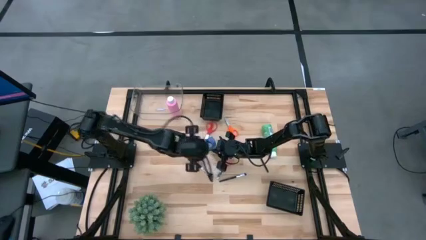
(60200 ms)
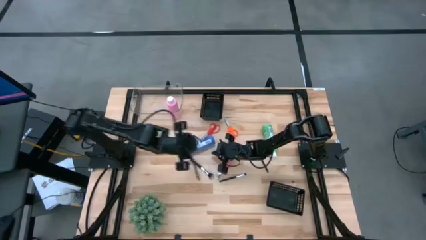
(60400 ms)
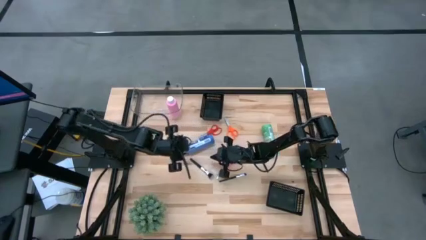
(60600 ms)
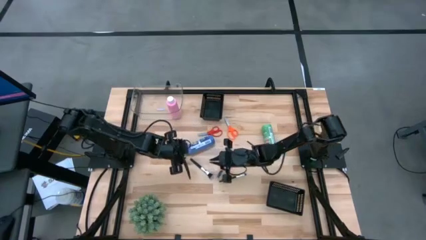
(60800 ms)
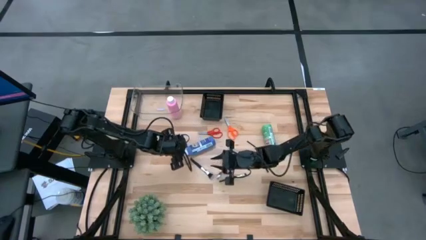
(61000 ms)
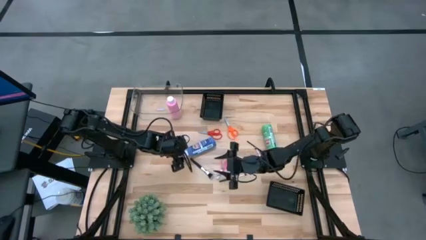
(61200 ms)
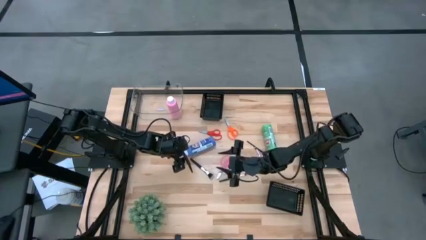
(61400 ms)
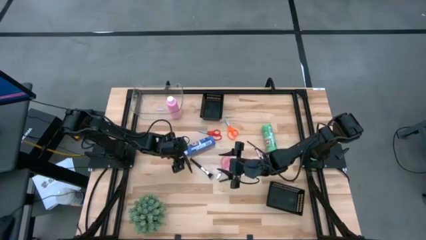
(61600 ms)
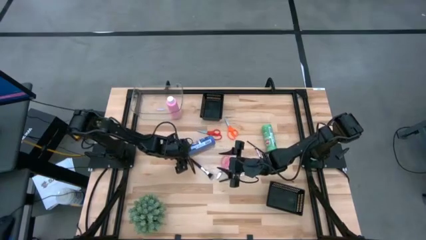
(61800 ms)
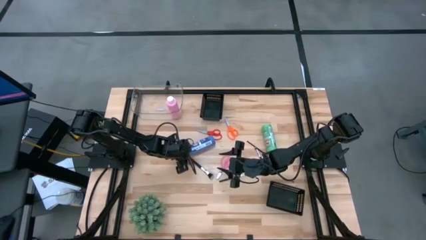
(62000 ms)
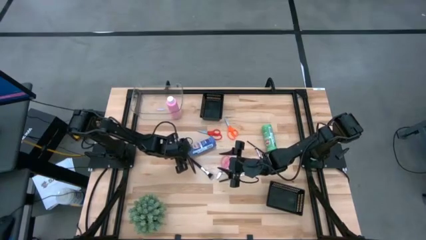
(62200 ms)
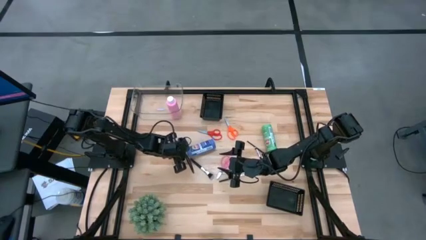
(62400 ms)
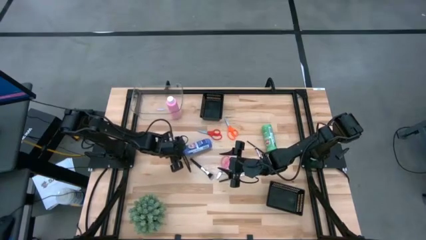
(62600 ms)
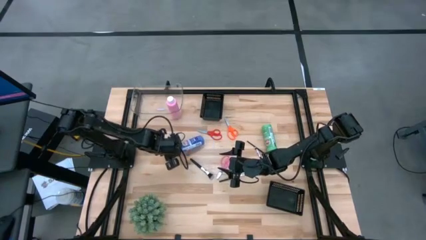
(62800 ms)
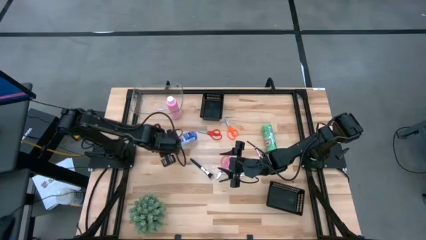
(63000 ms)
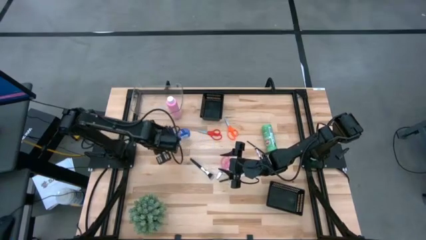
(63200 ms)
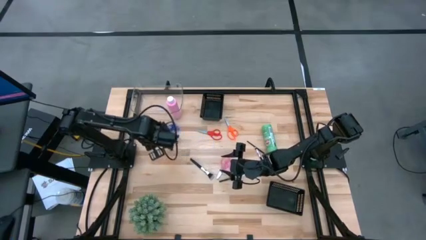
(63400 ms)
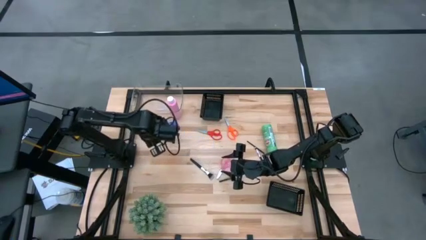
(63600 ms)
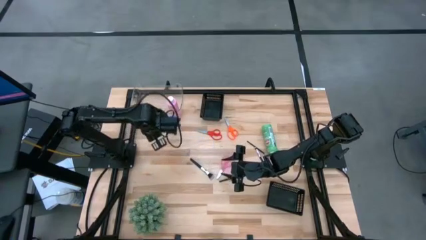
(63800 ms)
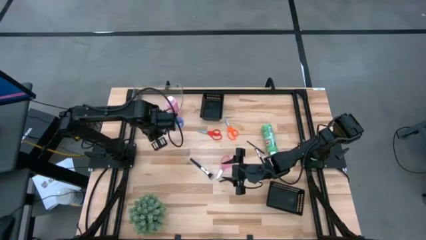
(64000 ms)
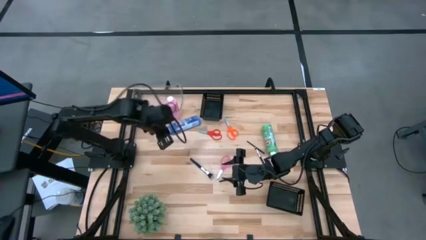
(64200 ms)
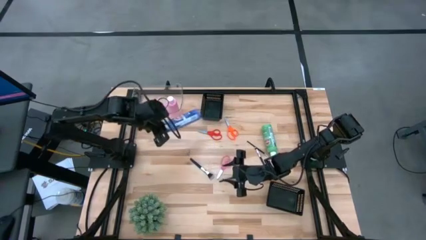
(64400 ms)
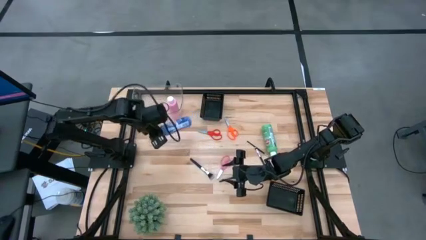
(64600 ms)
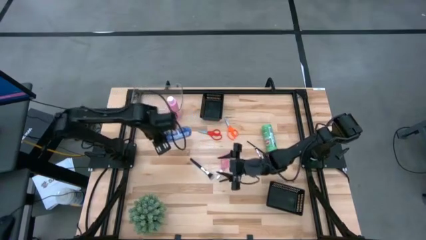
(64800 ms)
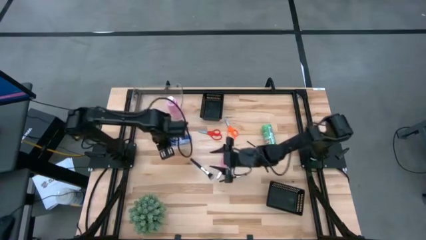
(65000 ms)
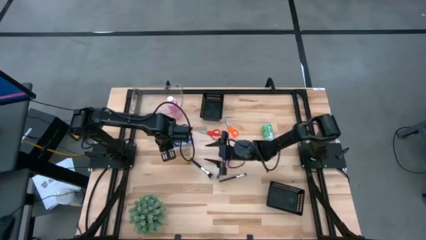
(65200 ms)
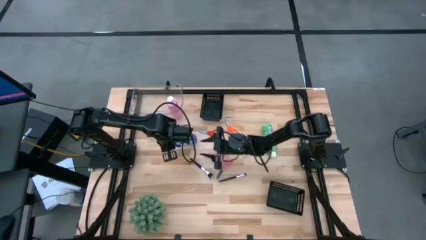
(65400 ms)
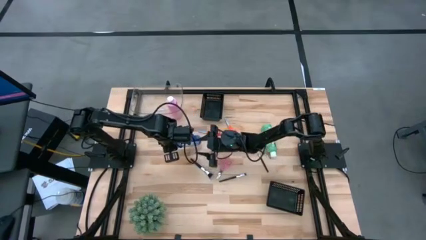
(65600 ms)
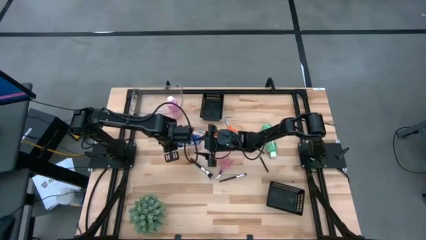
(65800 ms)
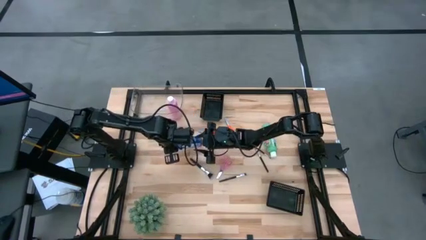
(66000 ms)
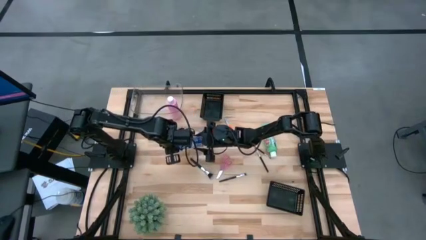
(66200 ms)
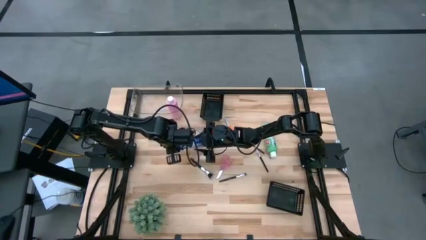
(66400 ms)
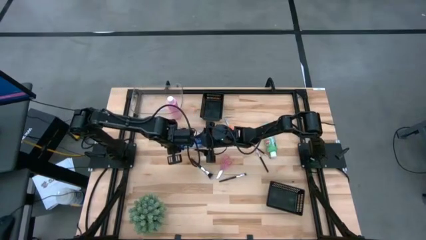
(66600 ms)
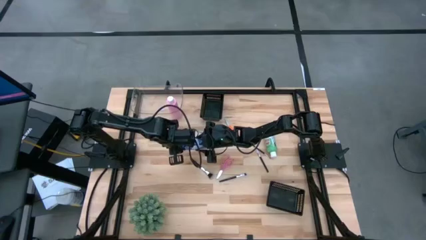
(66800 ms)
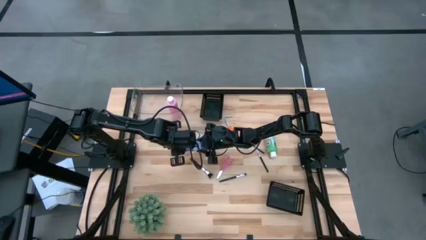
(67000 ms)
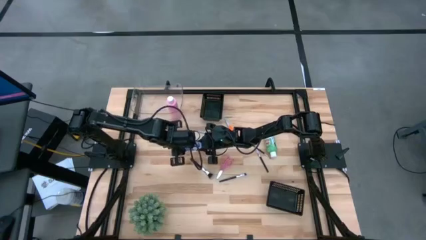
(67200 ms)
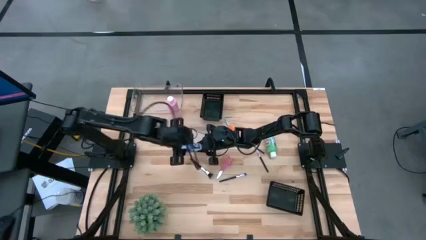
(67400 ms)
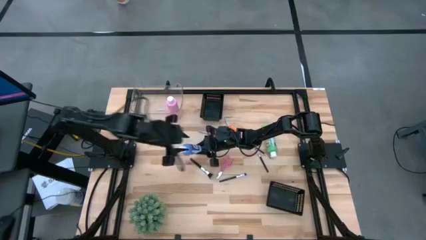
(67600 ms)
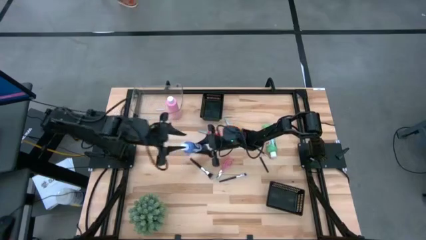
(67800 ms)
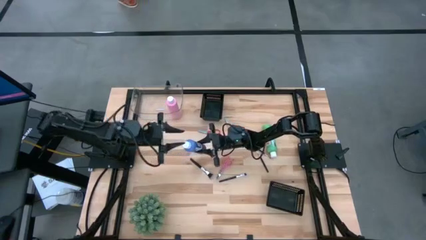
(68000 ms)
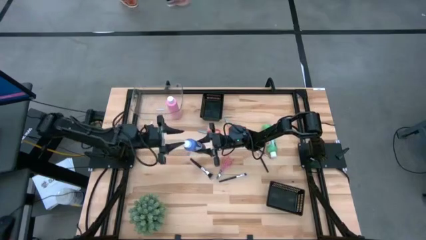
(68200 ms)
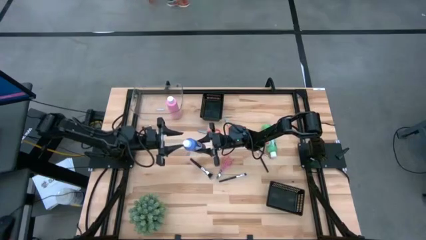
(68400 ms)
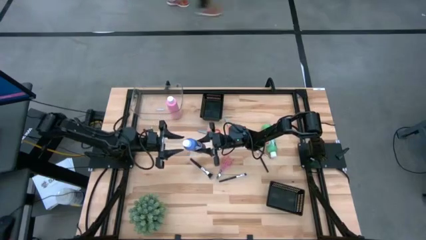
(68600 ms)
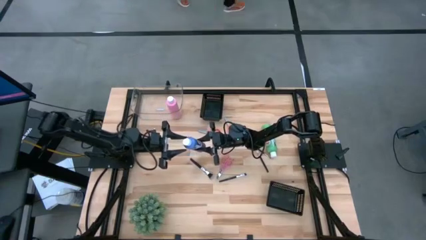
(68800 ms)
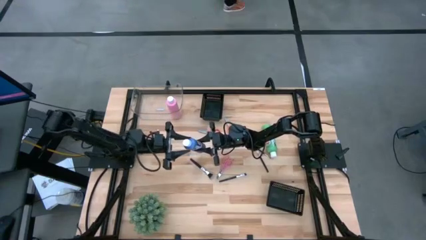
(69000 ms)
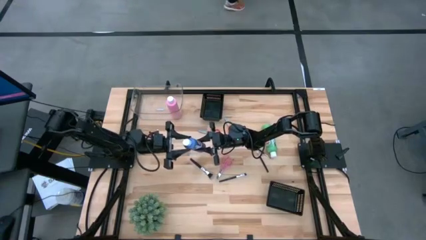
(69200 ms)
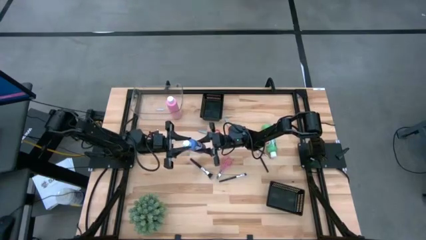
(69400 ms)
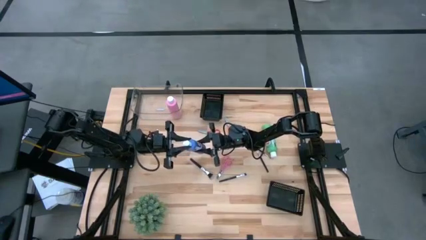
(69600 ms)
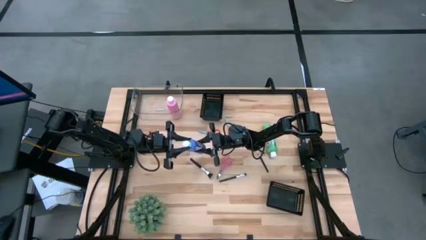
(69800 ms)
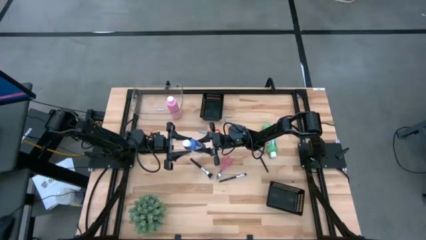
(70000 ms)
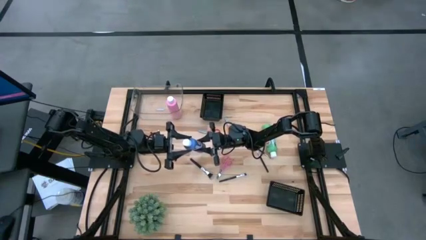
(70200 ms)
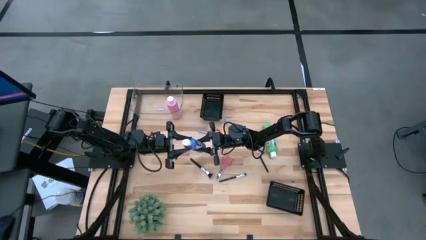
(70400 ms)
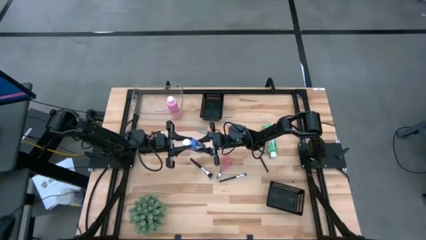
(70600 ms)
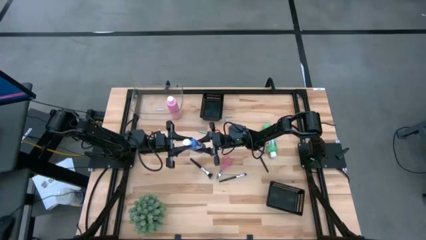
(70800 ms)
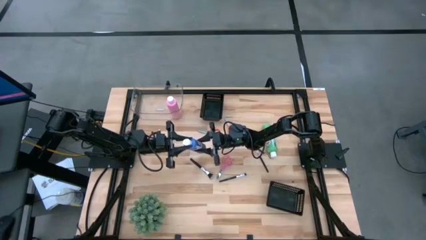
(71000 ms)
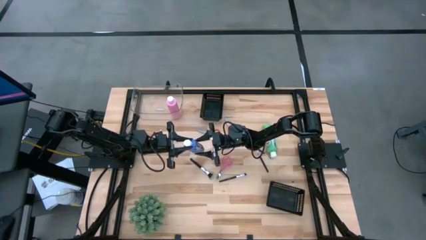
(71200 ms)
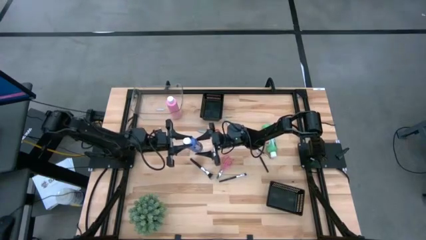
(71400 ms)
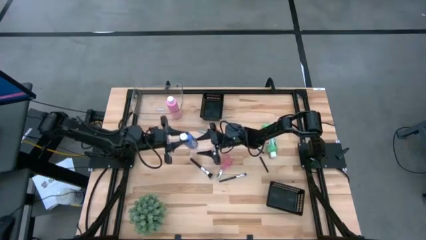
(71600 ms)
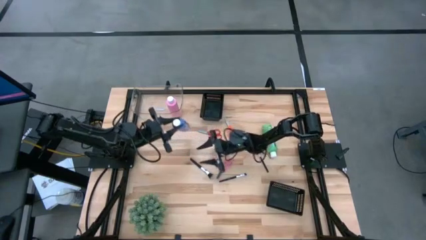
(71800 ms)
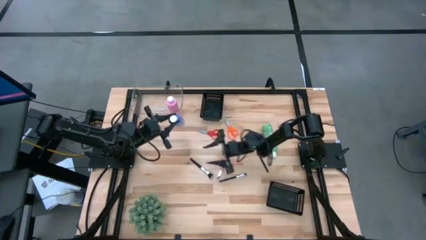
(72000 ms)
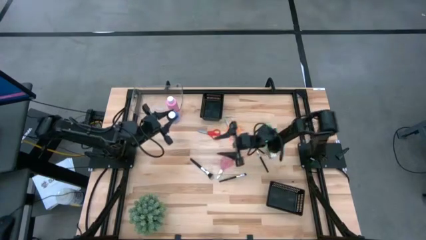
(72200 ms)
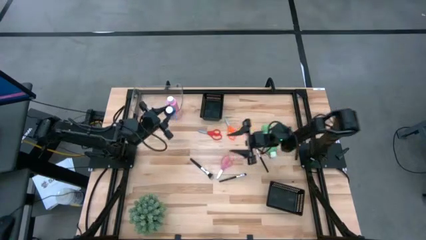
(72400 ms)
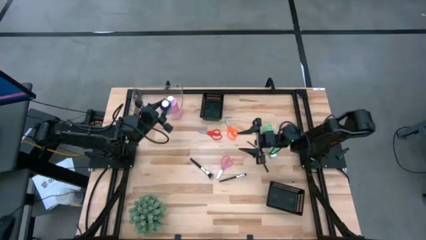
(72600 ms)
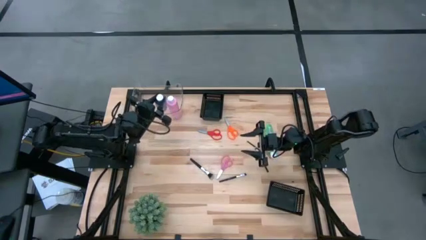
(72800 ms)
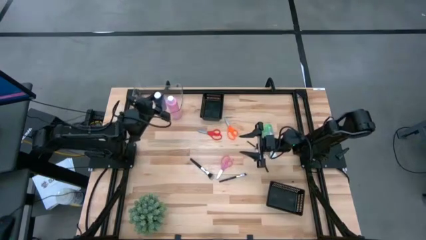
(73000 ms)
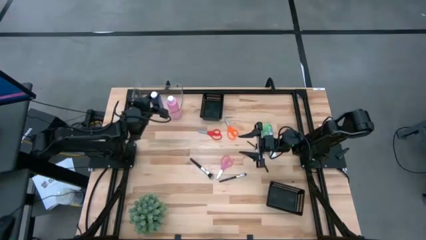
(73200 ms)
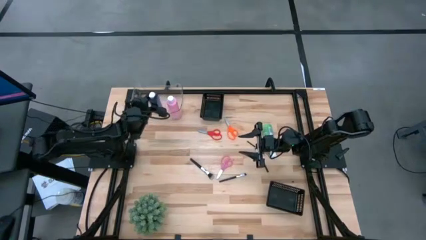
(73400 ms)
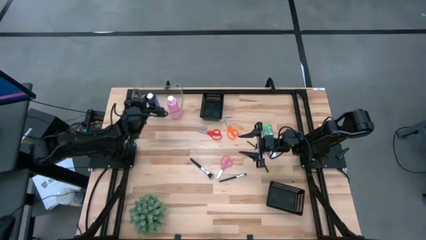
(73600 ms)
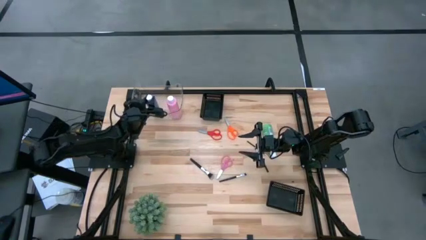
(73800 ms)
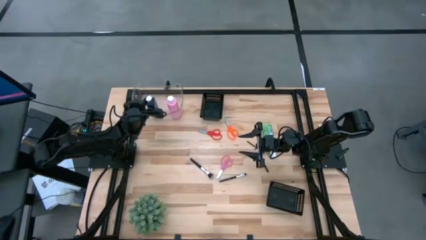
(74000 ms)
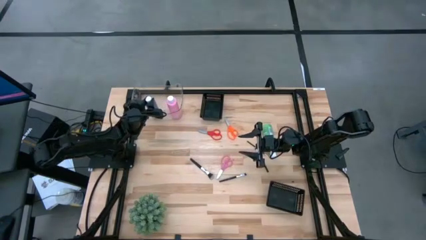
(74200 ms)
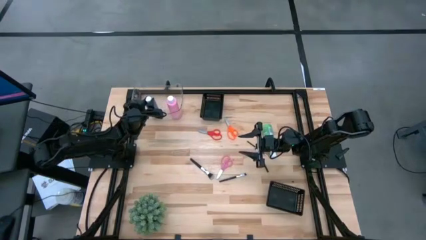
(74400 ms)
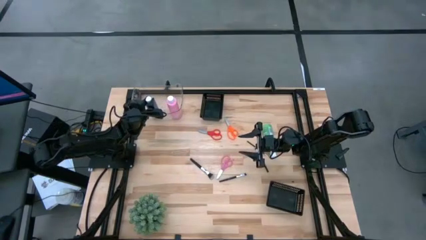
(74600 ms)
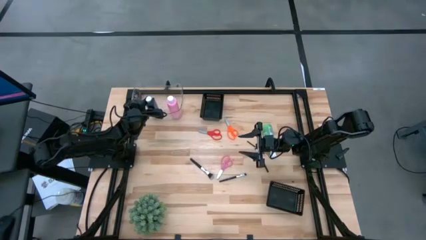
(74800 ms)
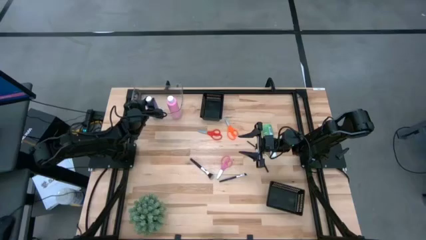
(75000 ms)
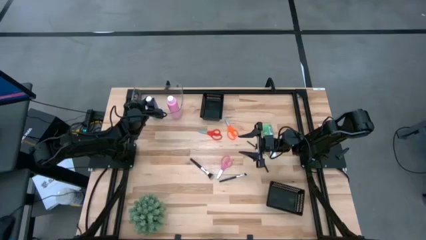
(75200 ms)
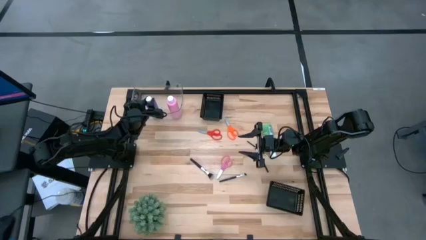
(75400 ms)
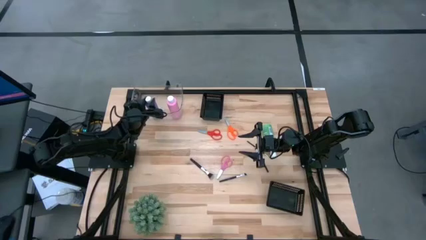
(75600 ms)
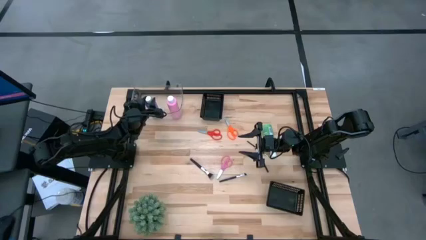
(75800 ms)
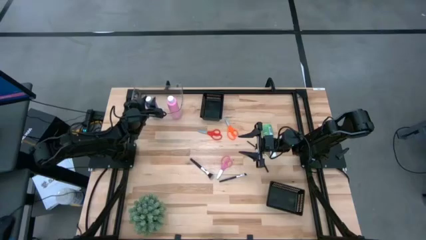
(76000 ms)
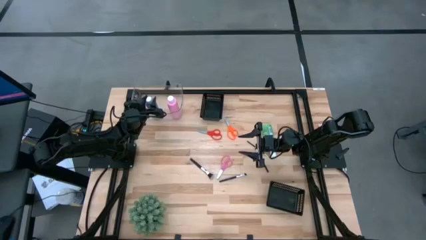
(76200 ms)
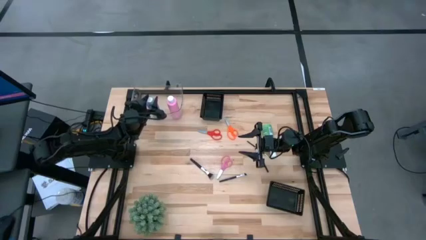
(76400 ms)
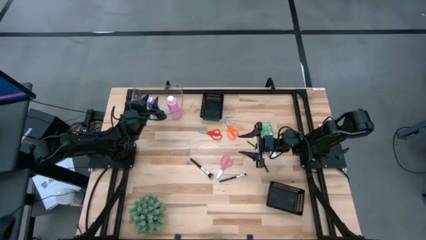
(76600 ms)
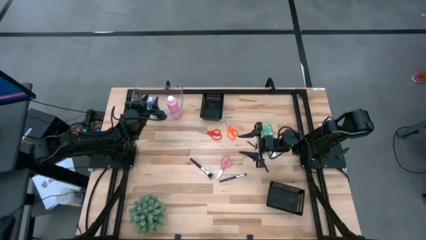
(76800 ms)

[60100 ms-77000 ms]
Task: Pick & Place Paint Supplies
Put the purple paint bottle into the transparent bin
